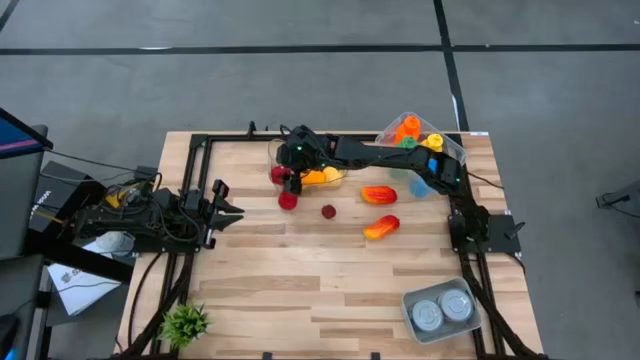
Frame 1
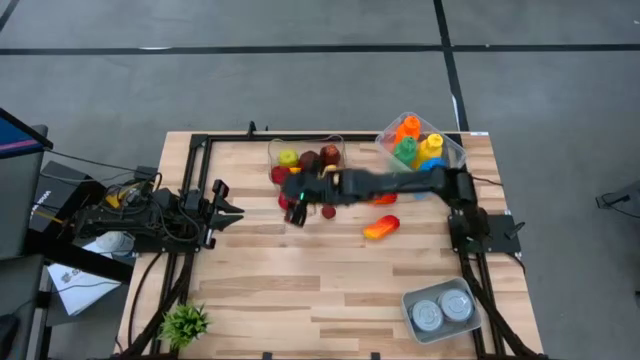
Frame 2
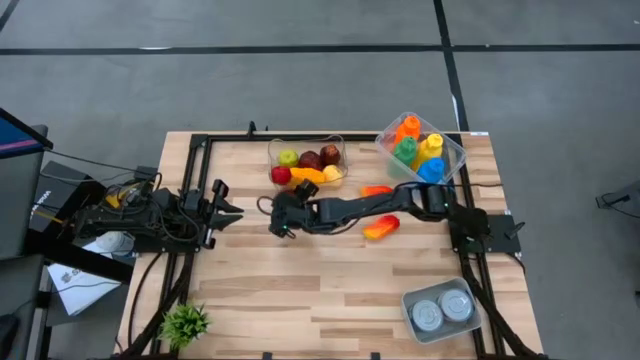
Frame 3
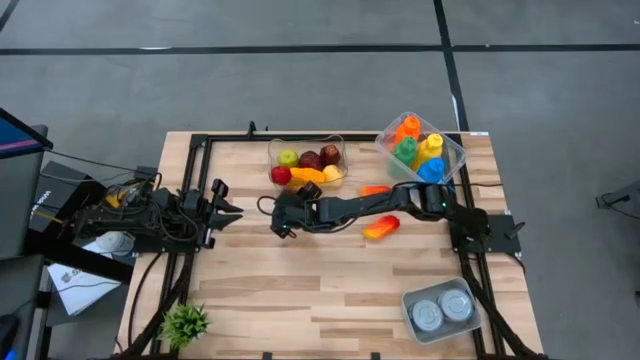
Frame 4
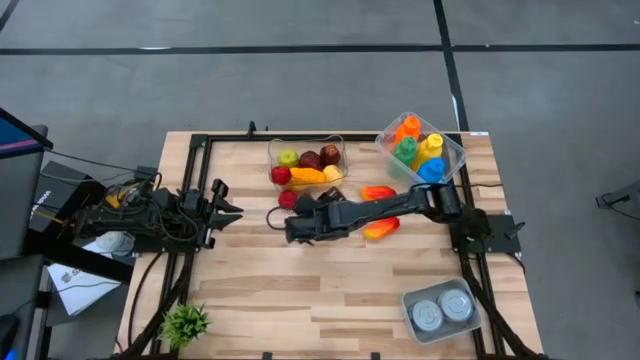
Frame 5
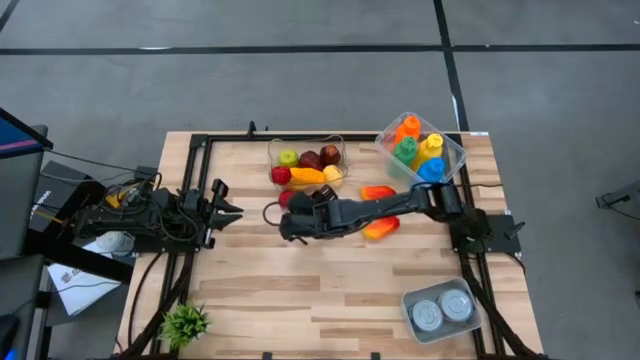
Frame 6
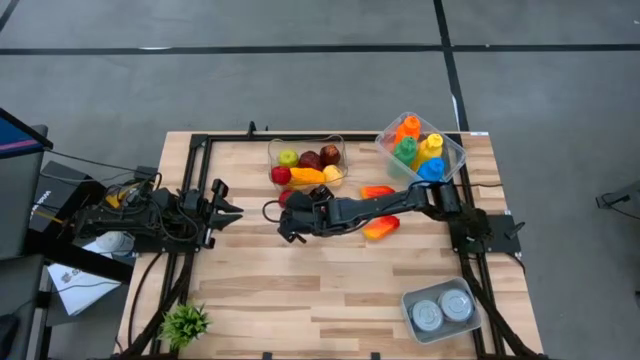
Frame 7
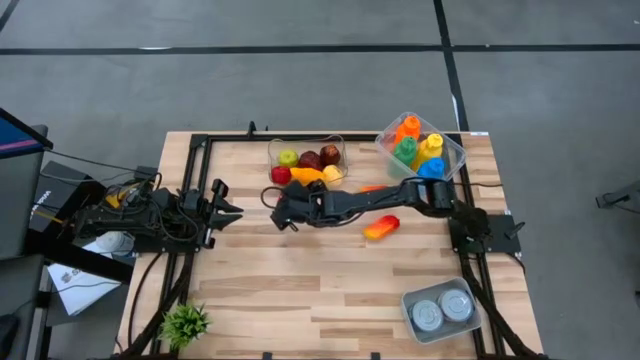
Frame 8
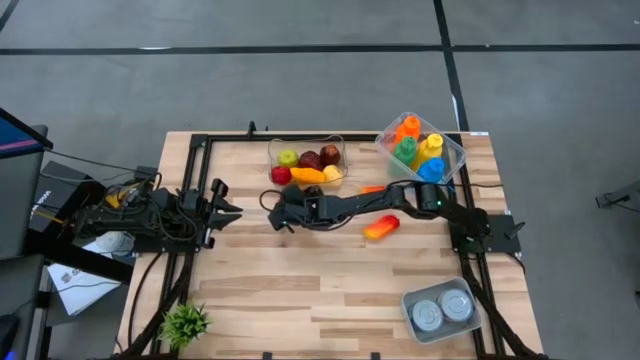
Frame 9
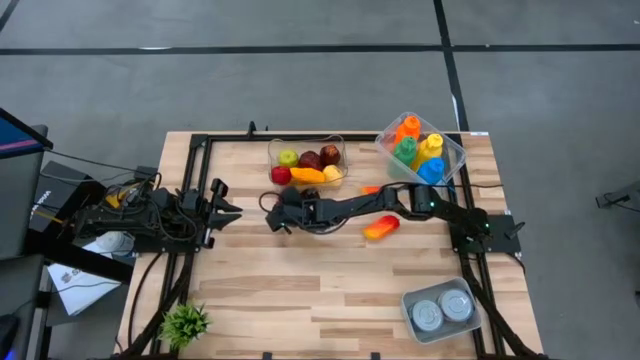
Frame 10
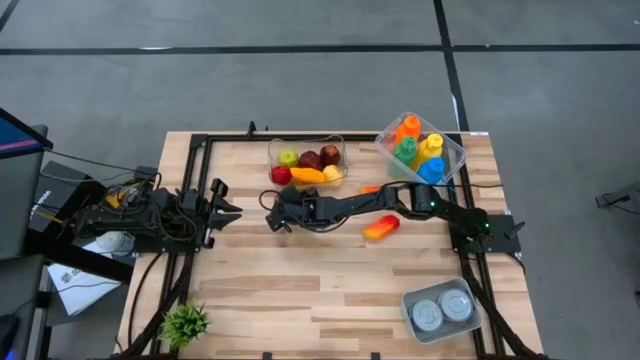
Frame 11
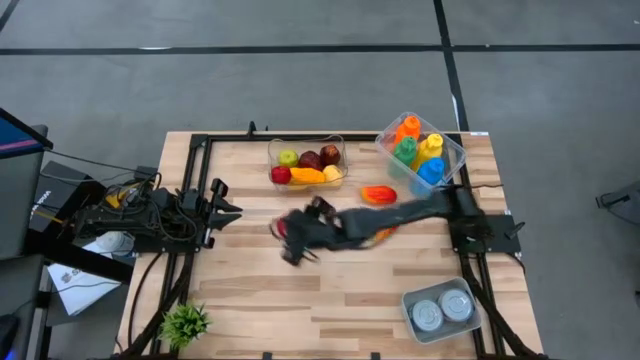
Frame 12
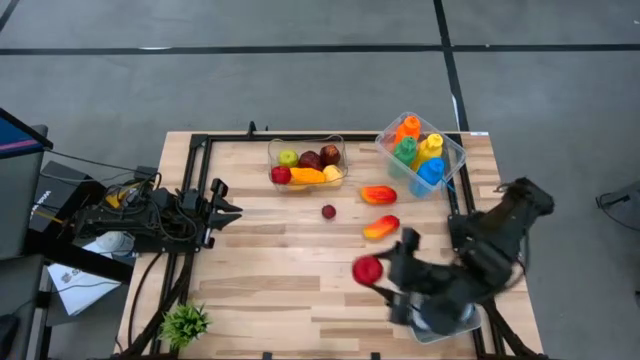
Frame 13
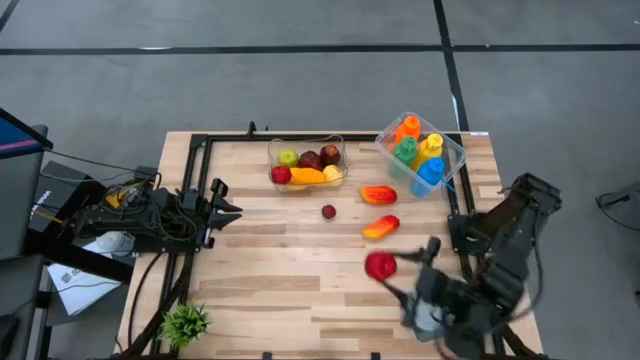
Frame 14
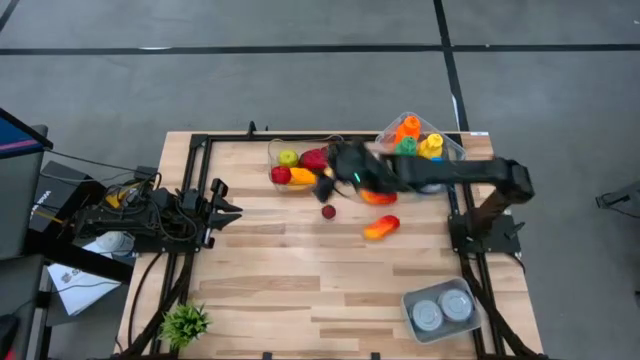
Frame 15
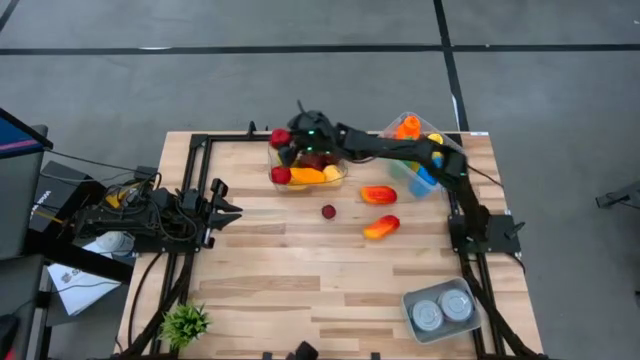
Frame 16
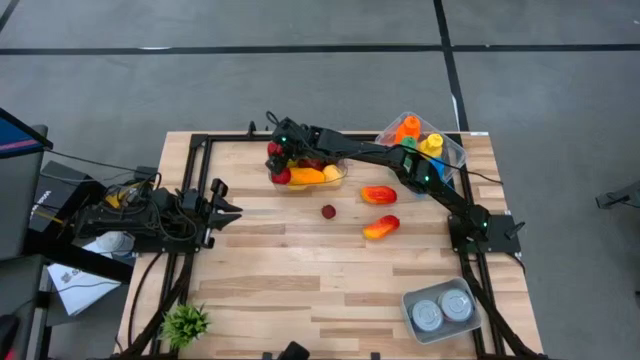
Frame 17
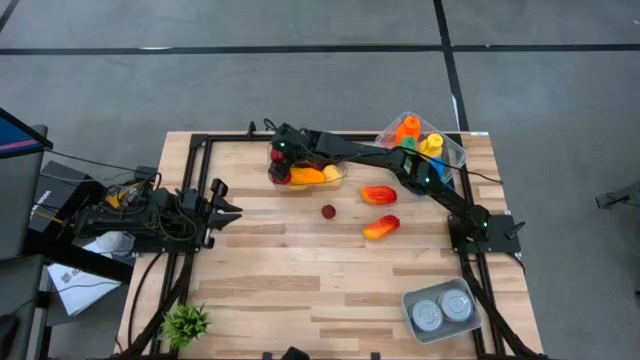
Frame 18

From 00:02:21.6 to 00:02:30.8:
Task: Pick & Place Food Item
Put the red tomato into the transparent bin

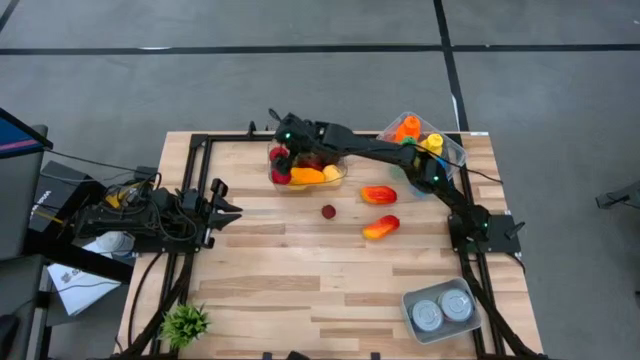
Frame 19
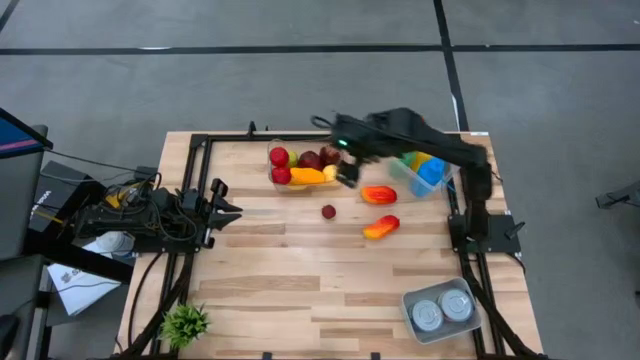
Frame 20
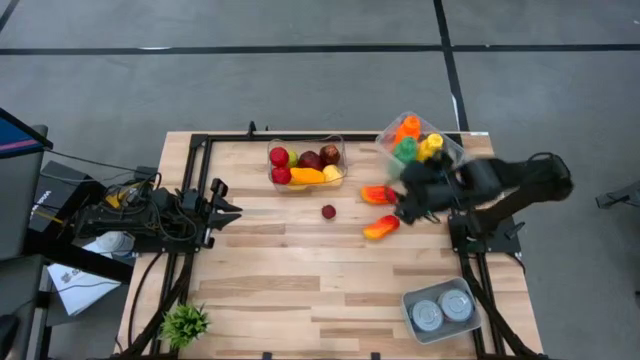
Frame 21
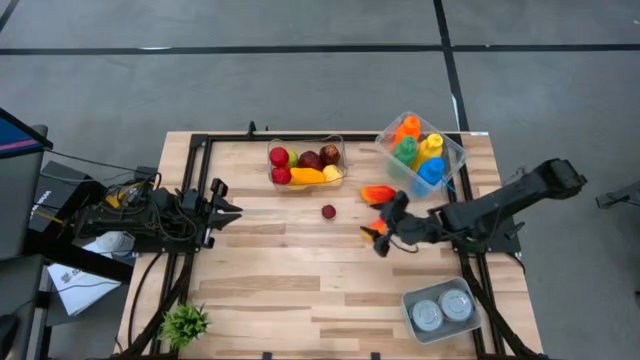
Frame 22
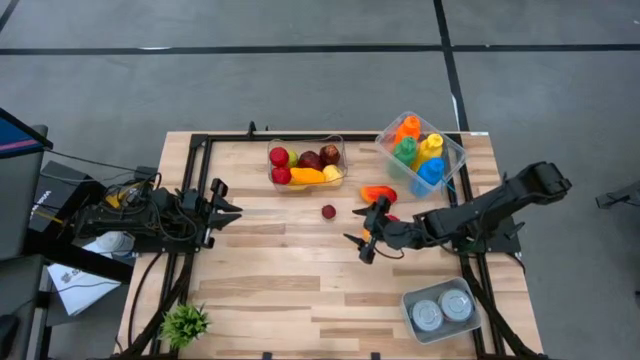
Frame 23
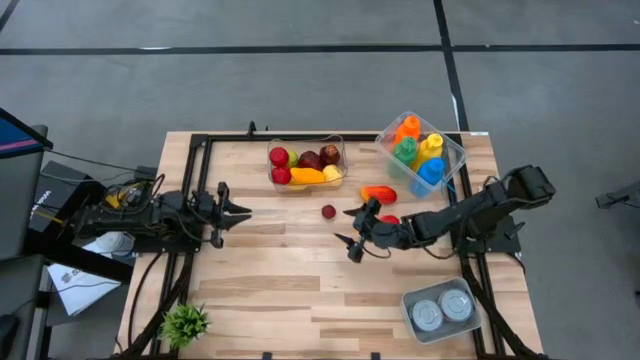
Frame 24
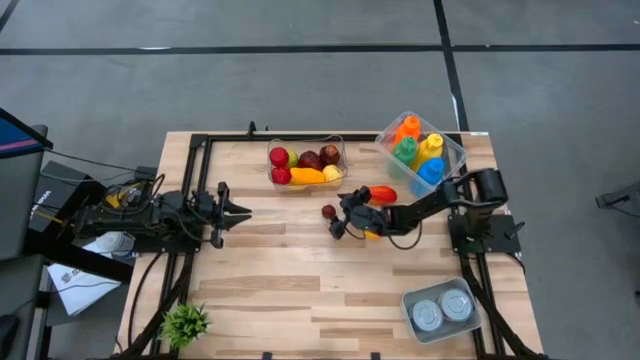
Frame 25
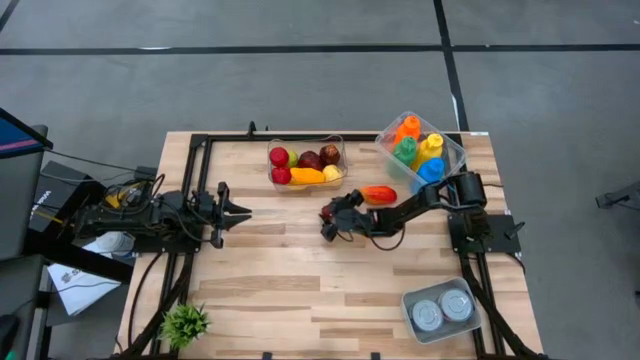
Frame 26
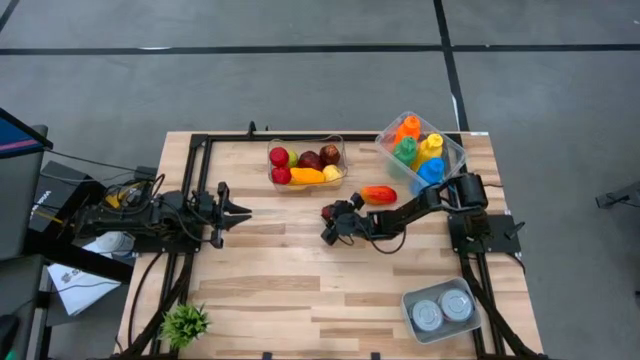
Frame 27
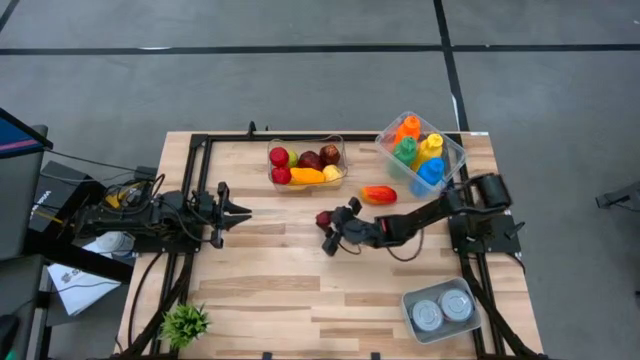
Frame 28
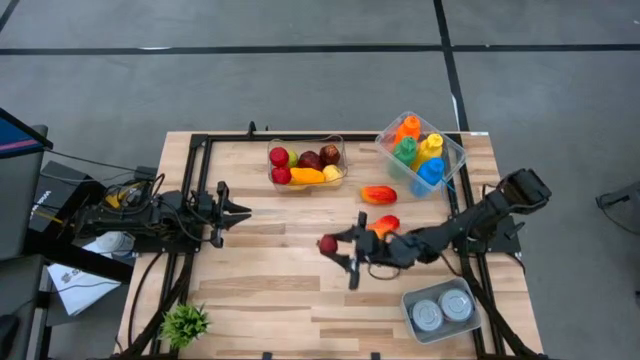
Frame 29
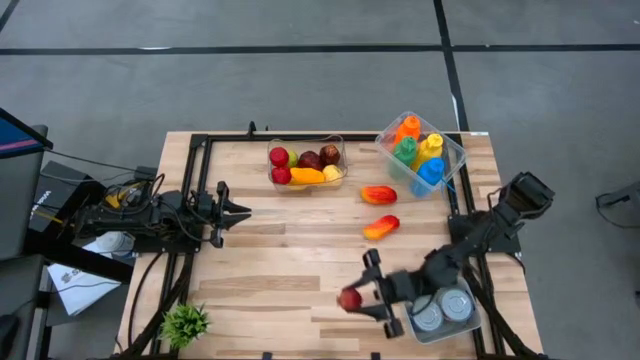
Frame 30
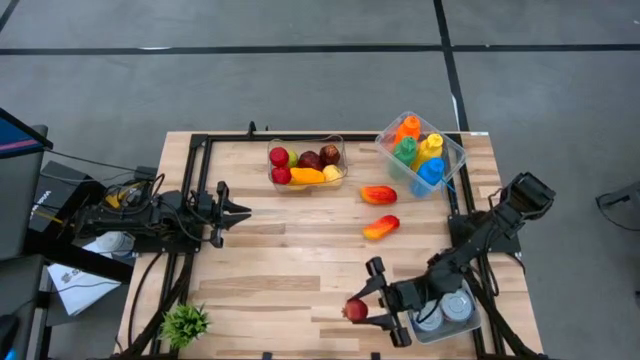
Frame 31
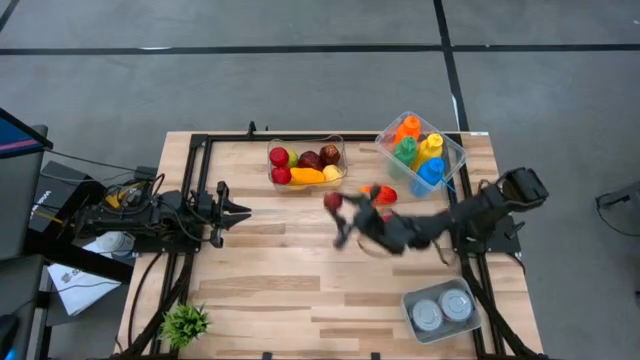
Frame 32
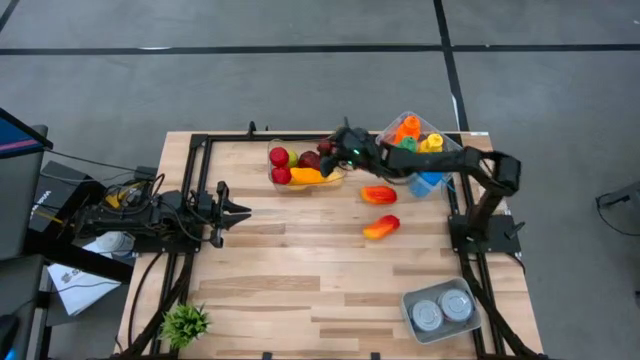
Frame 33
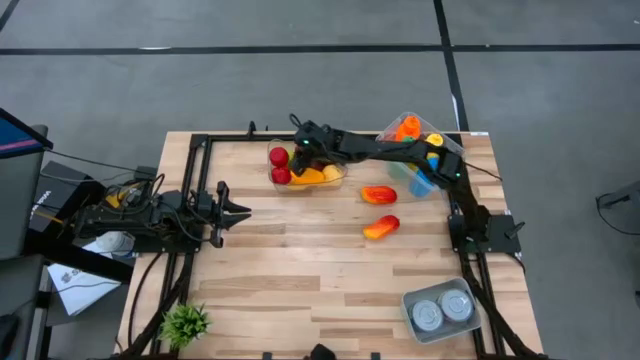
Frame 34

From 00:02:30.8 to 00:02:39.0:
Put the red pomegranate into the transparent bin

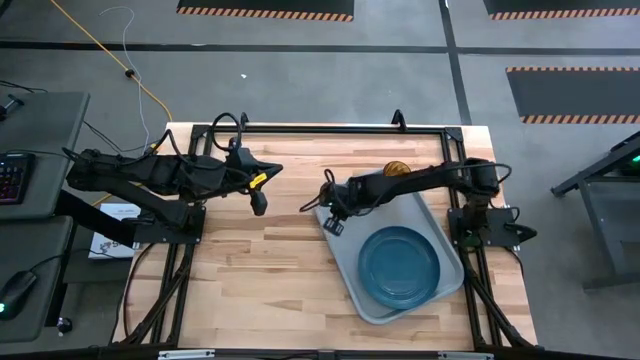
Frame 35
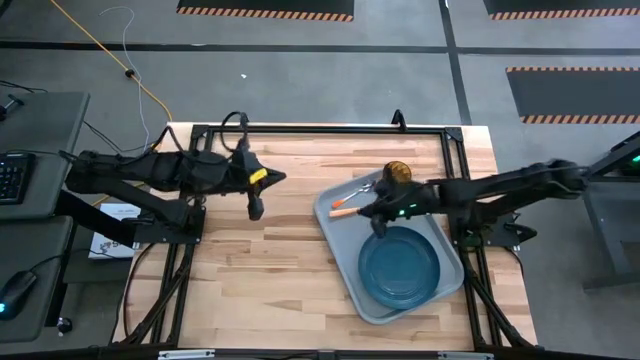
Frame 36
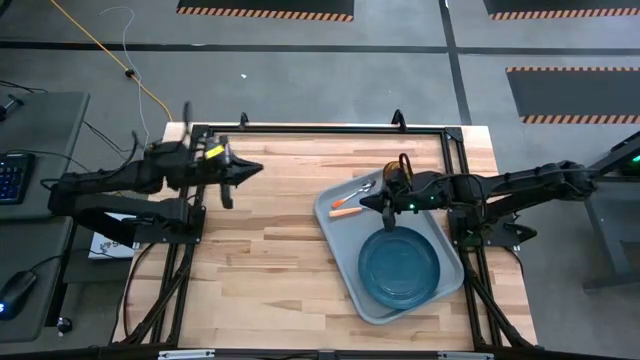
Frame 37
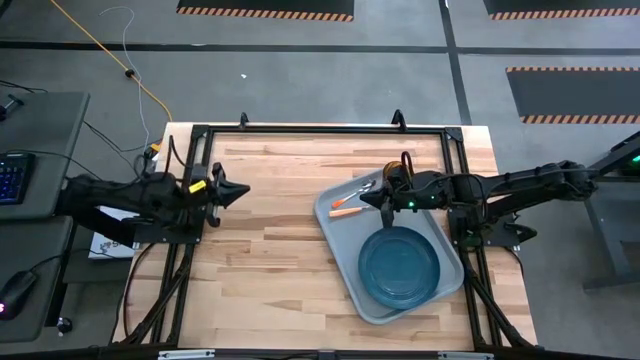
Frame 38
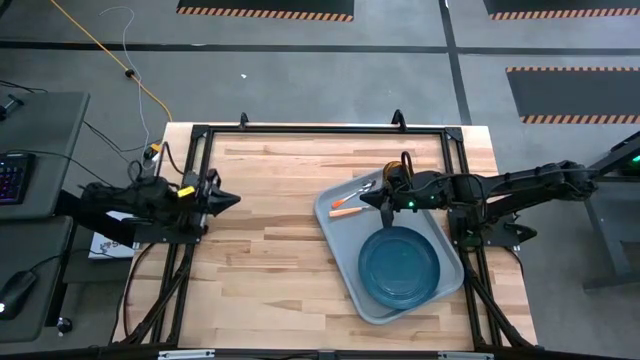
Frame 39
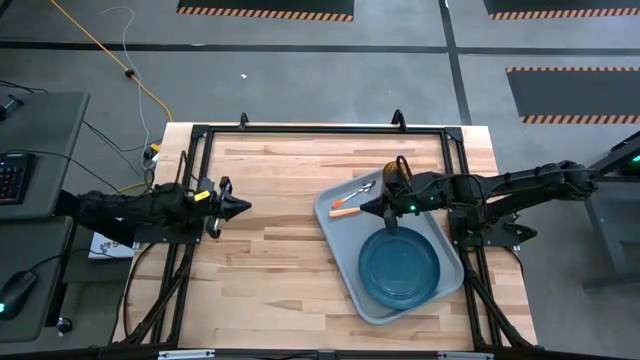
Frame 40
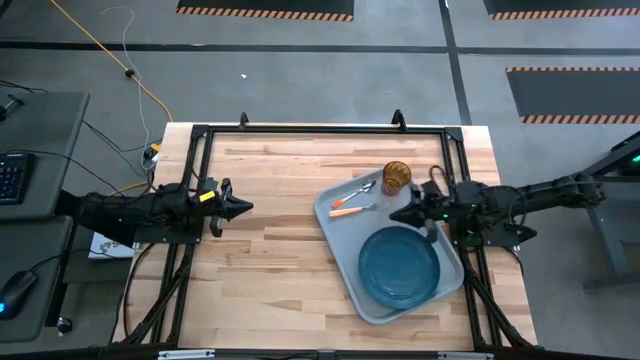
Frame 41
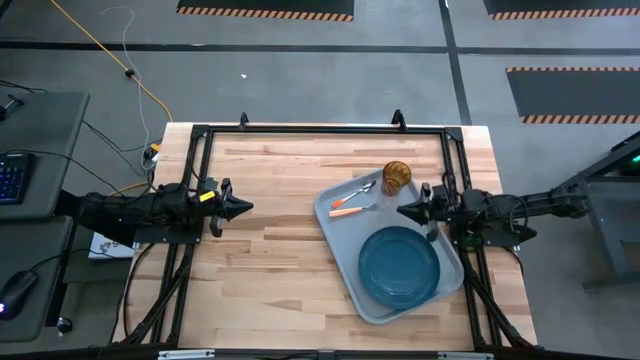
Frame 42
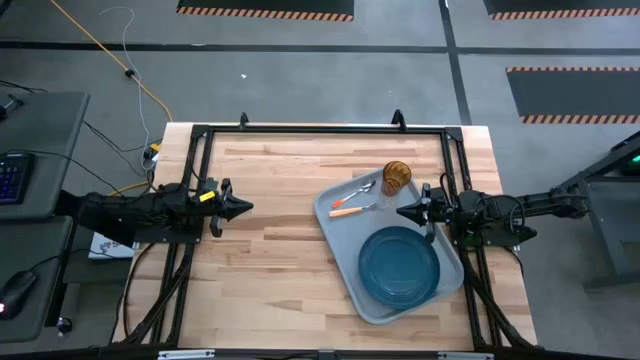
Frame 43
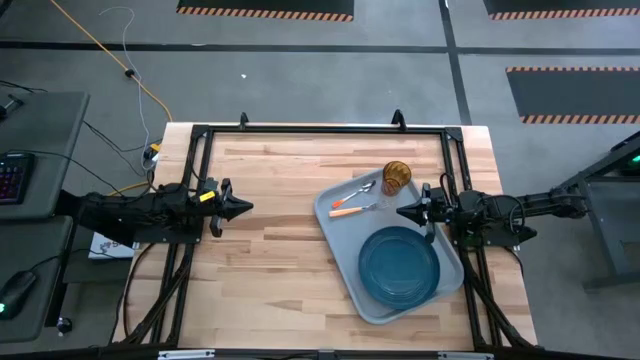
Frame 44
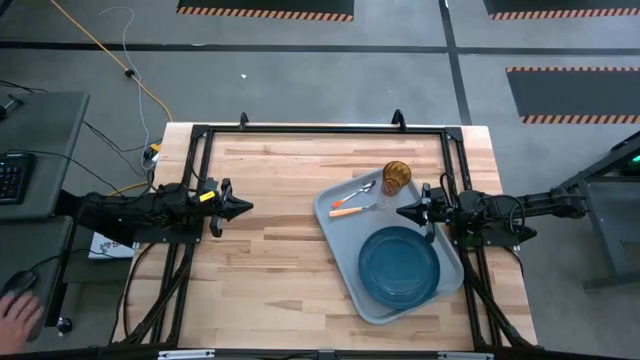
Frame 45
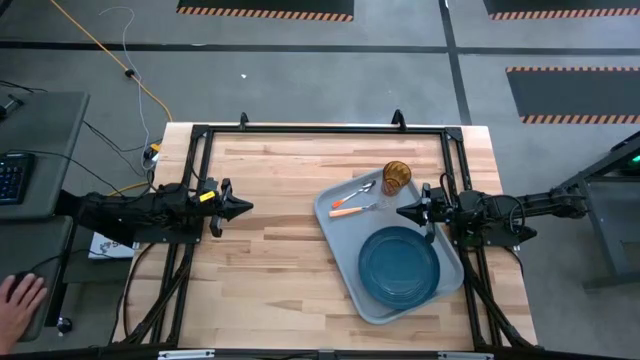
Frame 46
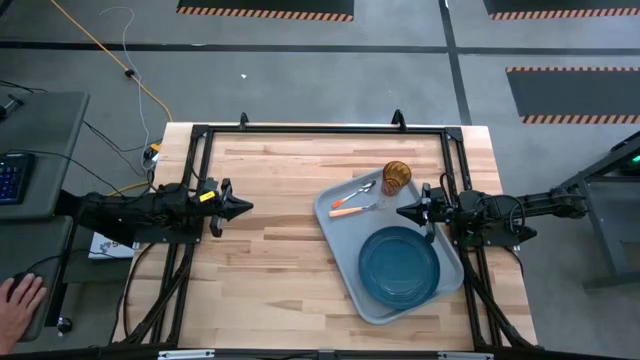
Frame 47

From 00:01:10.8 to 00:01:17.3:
Task: Pick and place plate/cup/fork/spoon on tray
Return to Home Position
